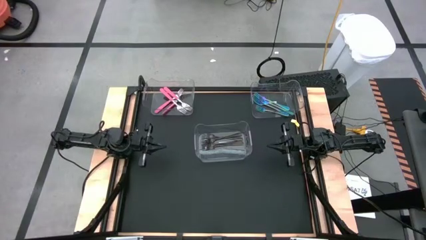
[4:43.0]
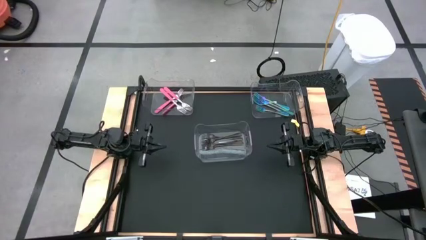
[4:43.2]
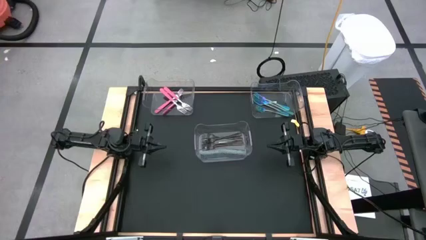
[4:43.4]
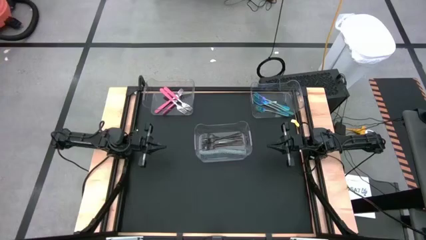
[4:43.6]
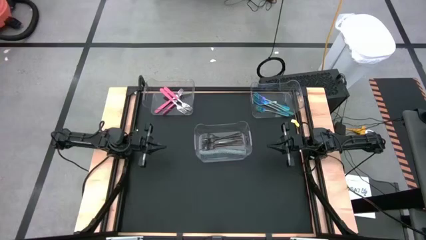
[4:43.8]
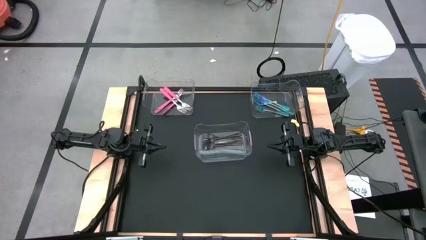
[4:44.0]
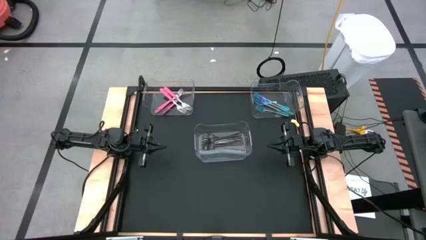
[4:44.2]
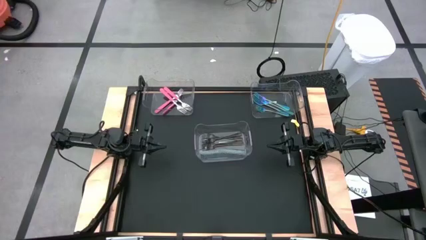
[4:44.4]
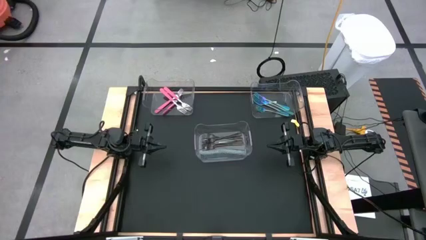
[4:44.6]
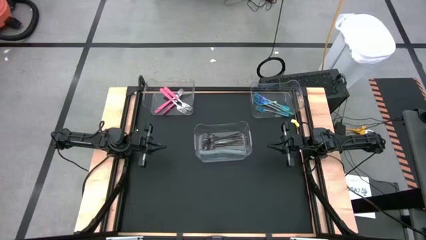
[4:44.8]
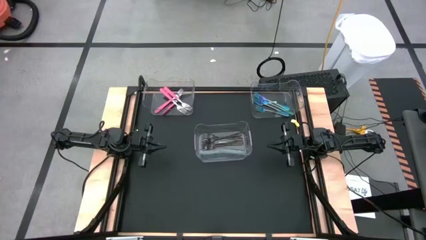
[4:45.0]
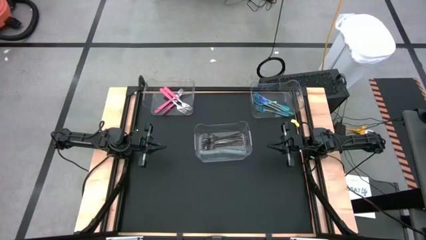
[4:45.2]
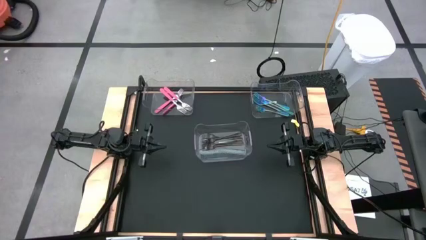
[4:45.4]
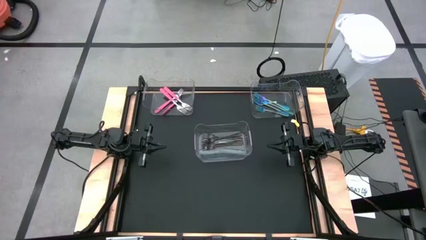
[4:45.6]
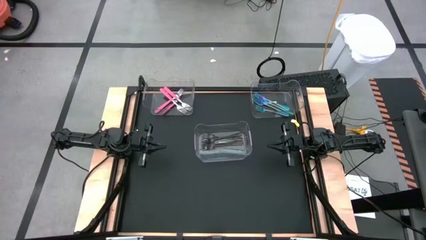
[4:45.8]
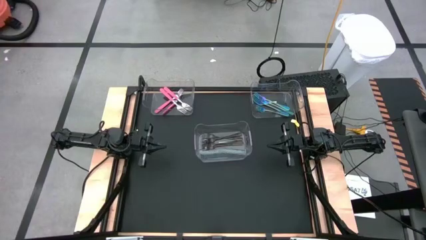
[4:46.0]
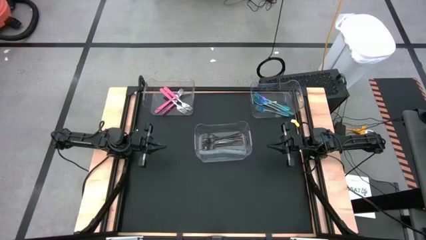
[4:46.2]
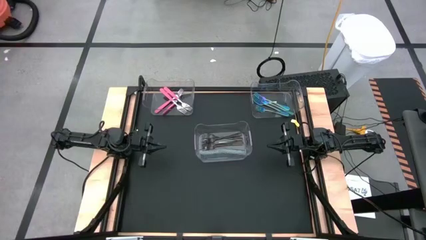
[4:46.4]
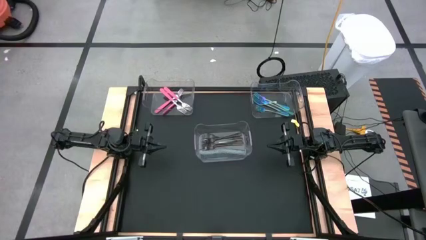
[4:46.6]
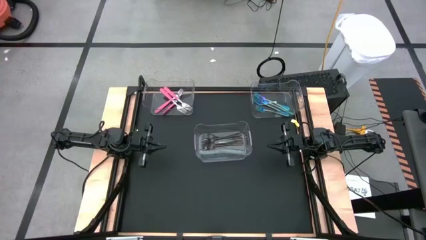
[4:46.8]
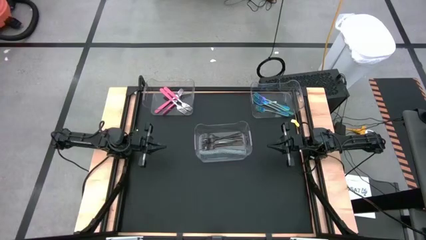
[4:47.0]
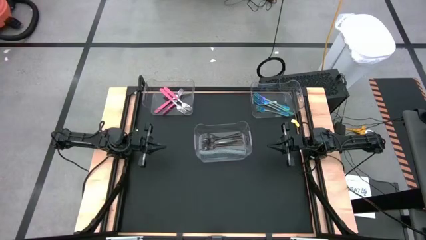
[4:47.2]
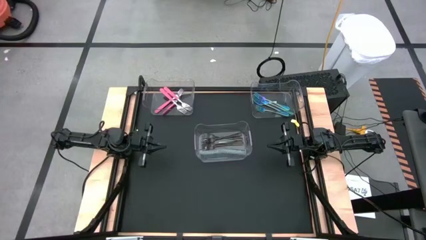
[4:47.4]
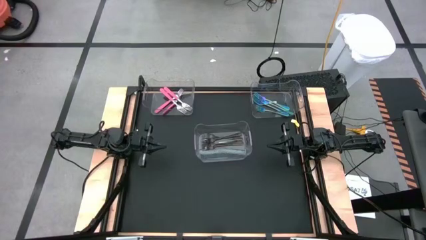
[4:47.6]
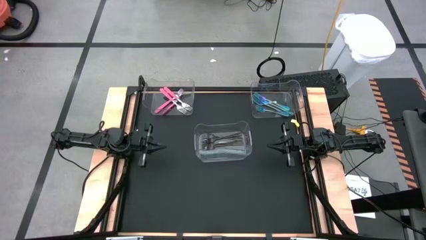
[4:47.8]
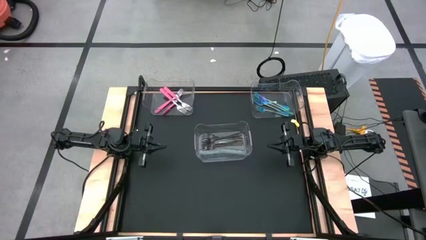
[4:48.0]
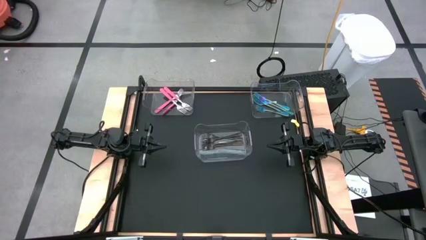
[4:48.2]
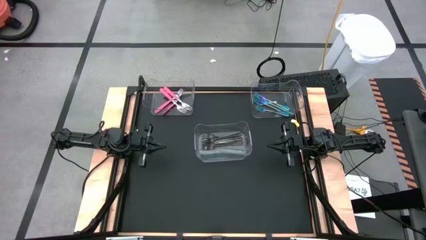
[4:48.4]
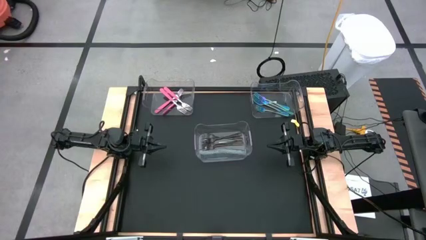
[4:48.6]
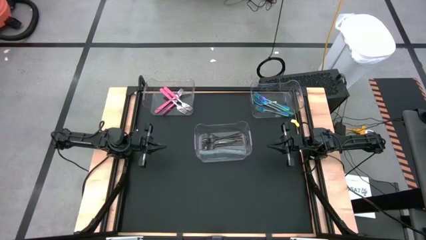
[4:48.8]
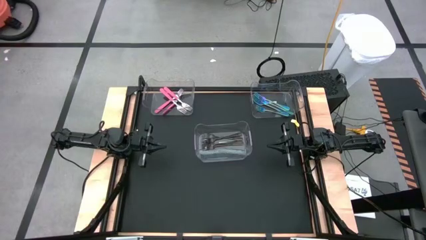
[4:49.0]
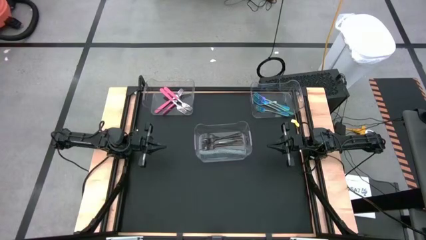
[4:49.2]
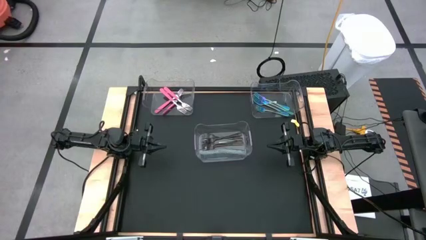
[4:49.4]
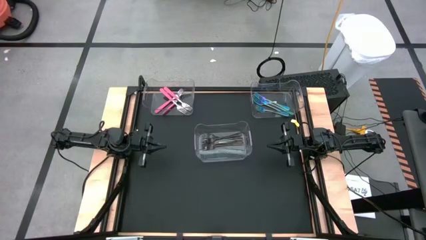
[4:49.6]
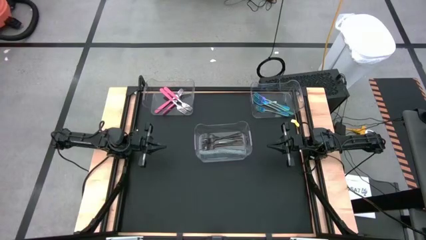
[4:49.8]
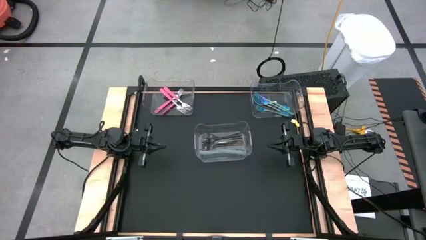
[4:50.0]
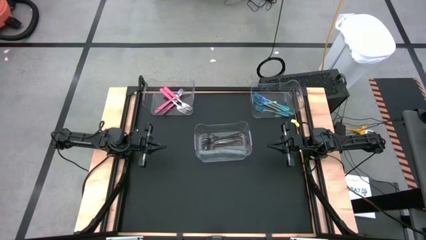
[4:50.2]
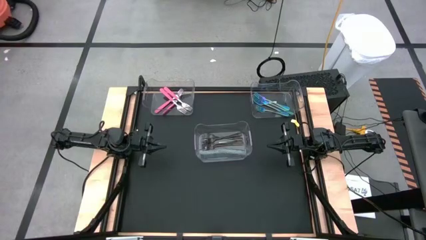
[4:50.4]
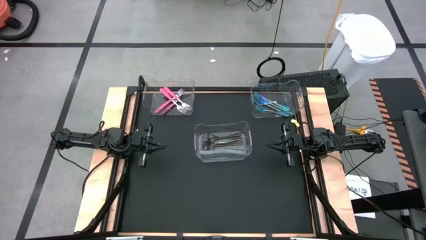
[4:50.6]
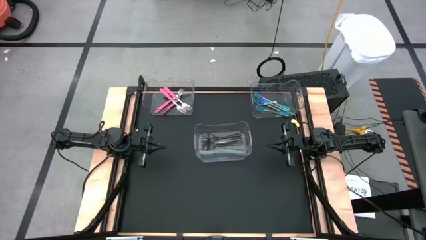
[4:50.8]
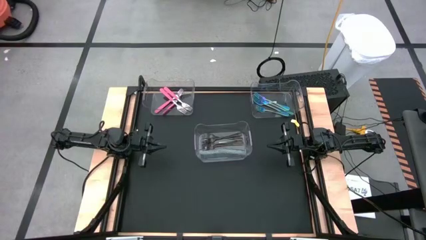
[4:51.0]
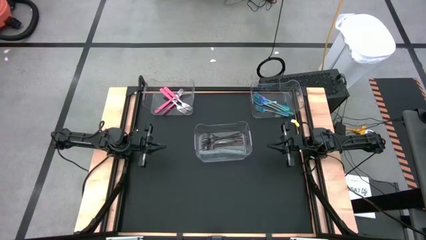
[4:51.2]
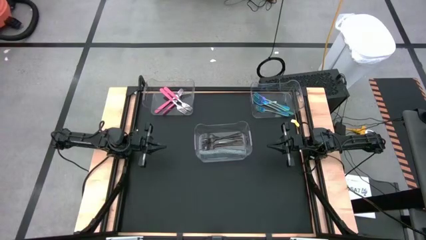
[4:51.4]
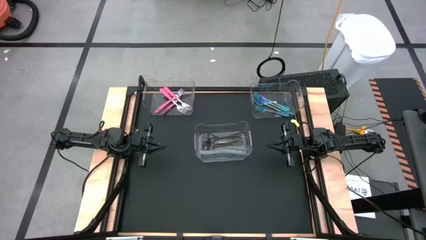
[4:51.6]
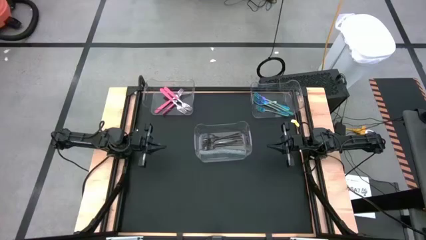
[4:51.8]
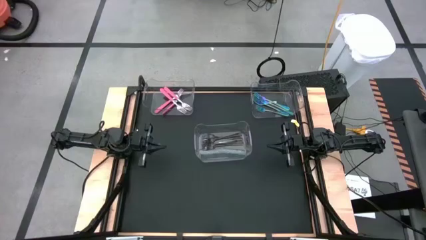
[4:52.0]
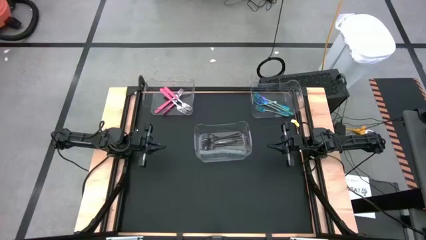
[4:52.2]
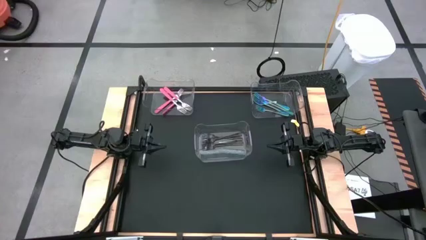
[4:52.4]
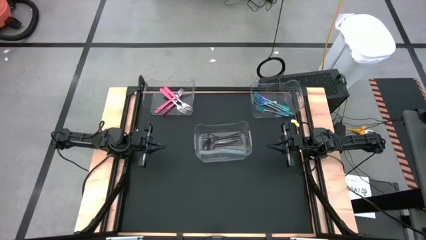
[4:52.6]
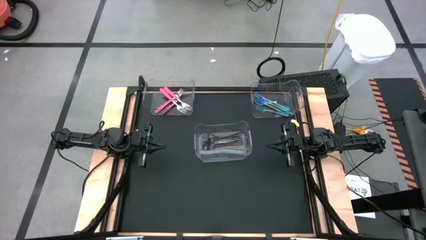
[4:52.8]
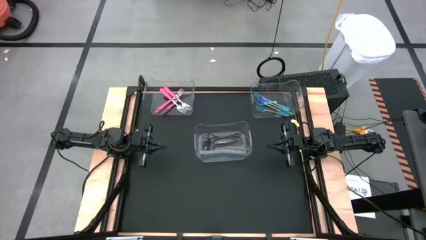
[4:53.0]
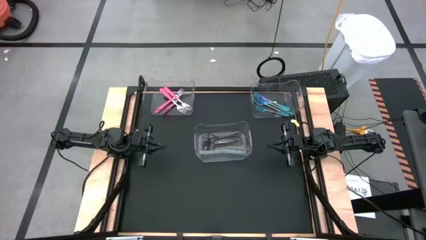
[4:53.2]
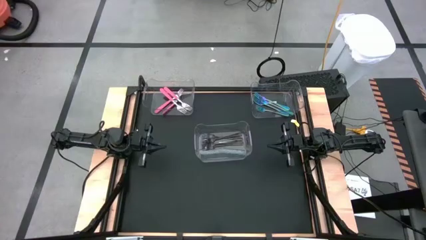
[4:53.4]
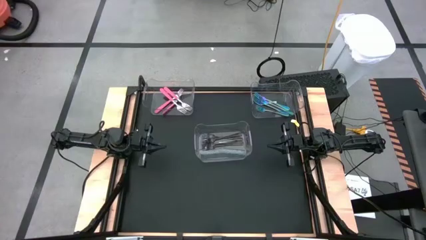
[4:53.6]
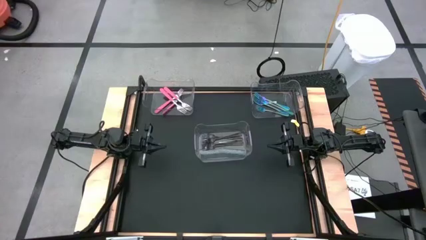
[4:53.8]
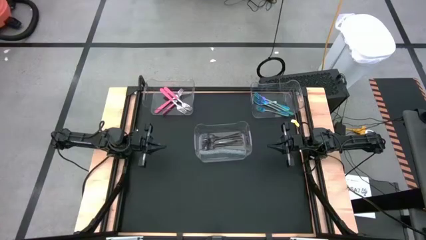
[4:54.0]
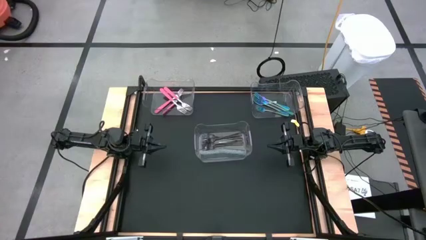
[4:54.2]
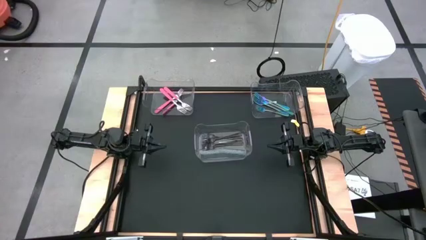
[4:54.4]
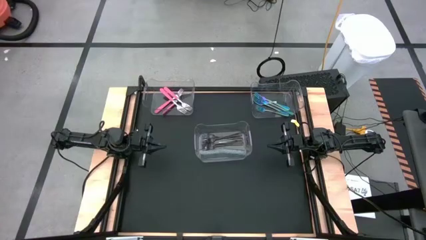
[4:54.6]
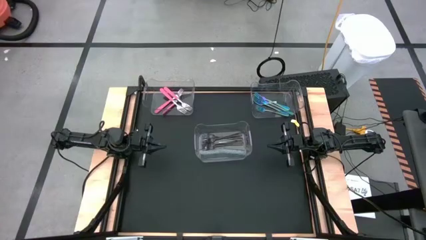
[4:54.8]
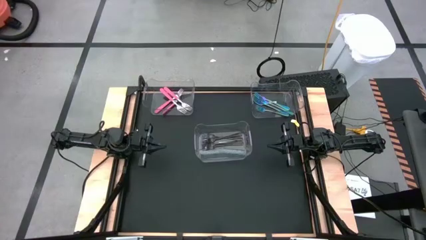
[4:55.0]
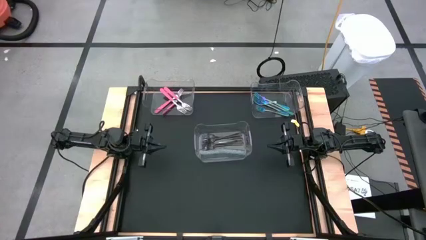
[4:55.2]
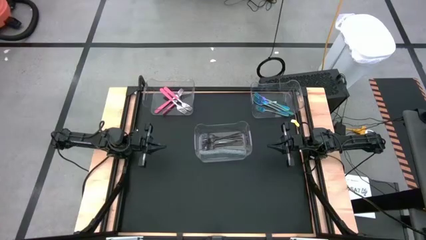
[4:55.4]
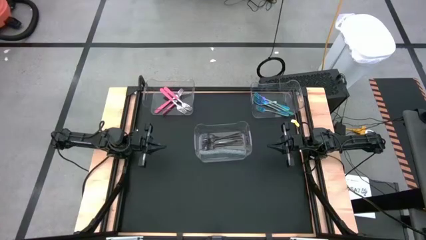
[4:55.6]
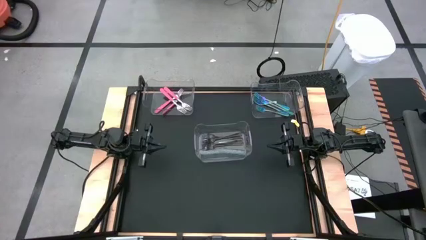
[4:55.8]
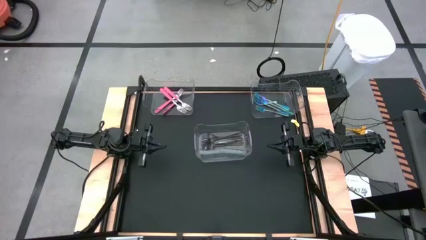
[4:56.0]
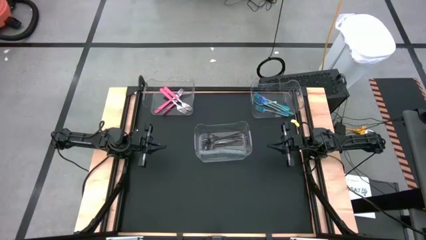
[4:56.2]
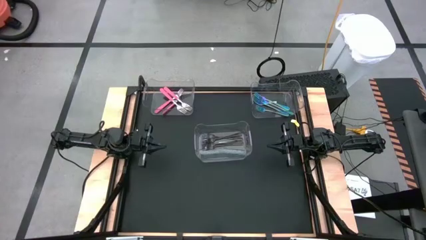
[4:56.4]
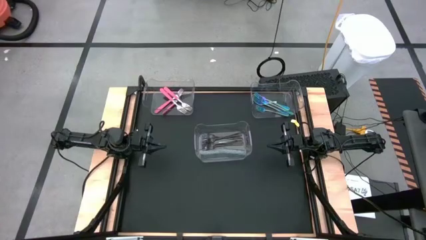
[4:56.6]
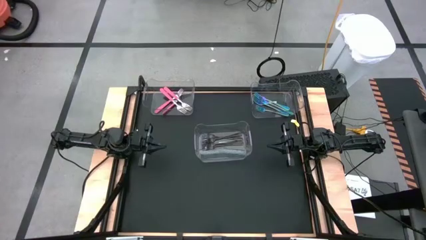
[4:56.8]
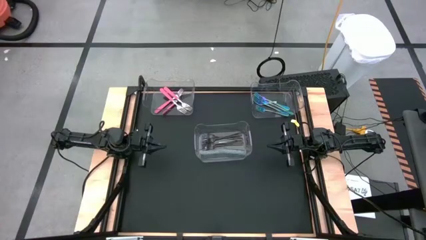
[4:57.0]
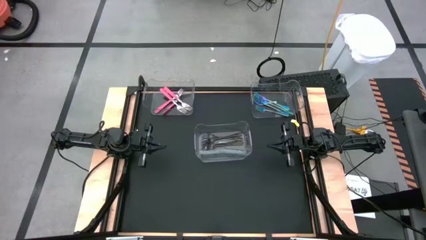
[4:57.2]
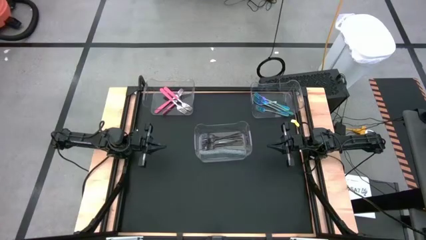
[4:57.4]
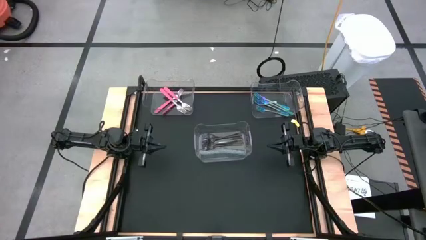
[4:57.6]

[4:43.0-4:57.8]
Task: Sort silverware by color (type)
Return to Home Position

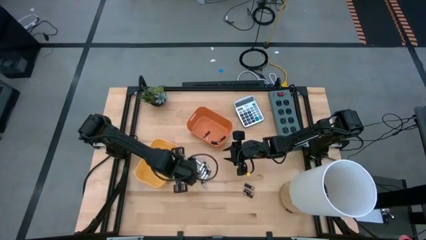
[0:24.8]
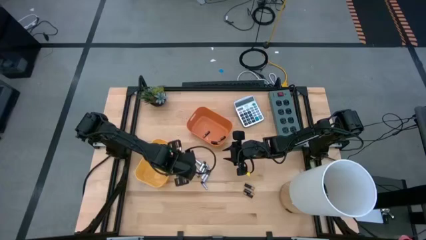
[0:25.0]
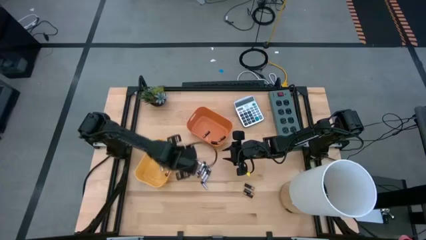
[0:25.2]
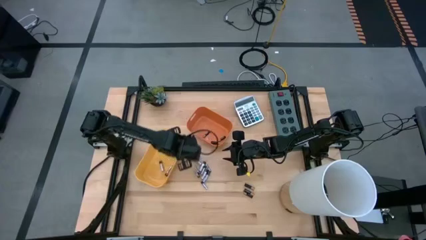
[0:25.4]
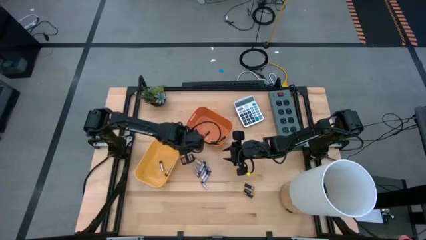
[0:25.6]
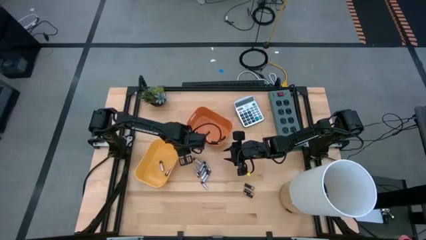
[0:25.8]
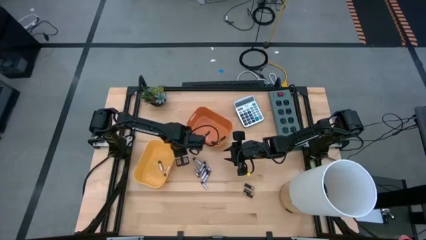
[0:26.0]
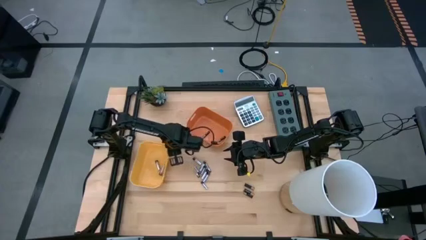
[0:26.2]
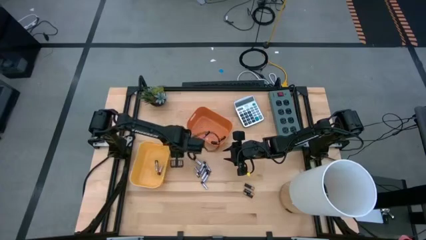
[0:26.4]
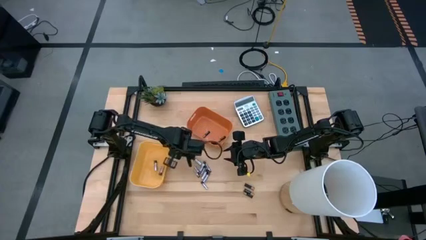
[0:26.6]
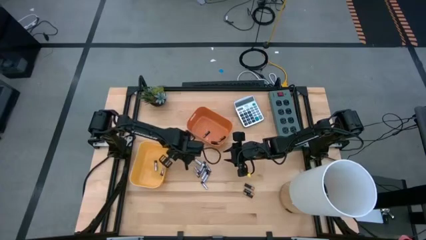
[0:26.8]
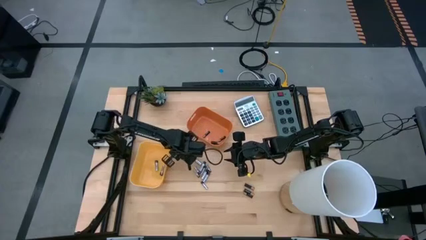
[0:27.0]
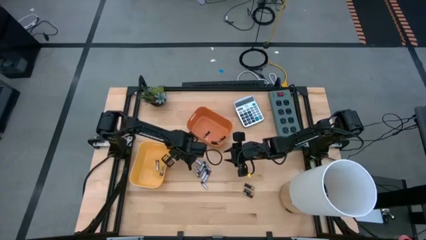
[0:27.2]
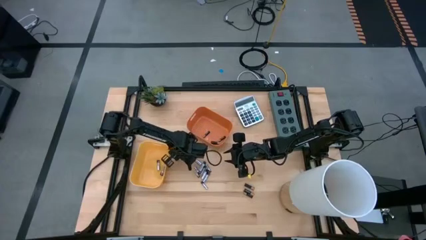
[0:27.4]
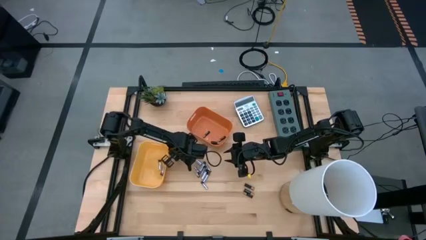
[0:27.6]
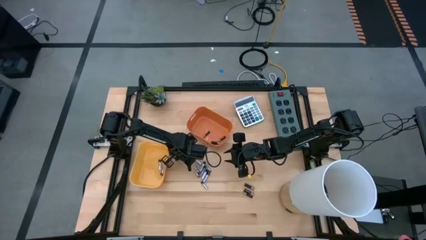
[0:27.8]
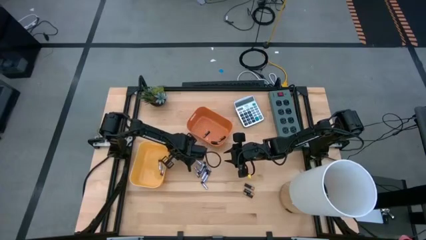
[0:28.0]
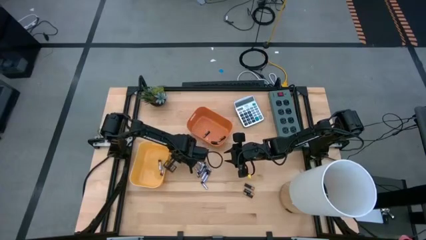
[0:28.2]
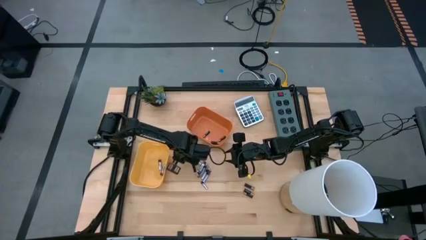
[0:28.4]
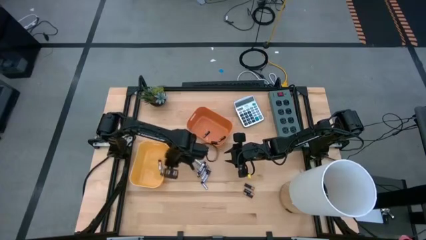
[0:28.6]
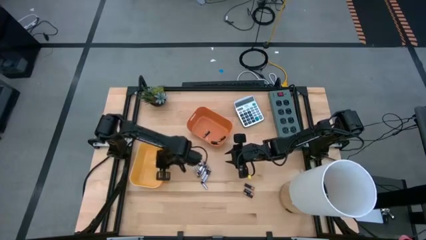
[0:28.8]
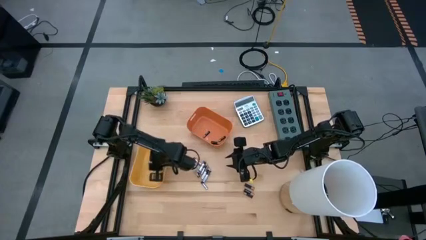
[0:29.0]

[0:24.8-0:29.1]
Task: Sort batteries
Put the silver battery into the yellow bin
